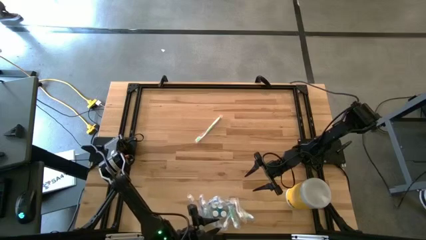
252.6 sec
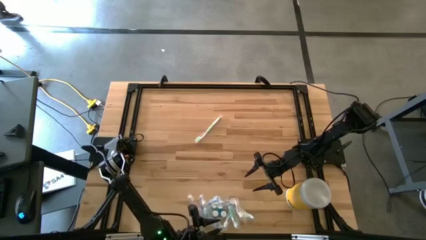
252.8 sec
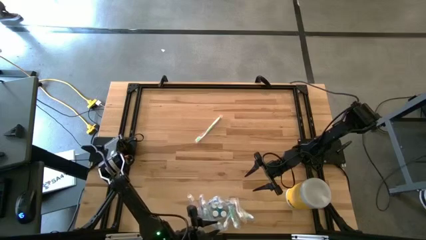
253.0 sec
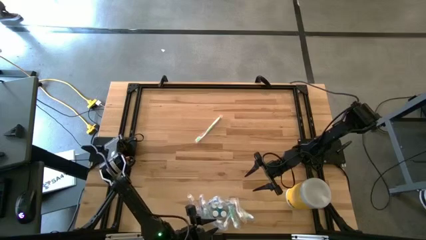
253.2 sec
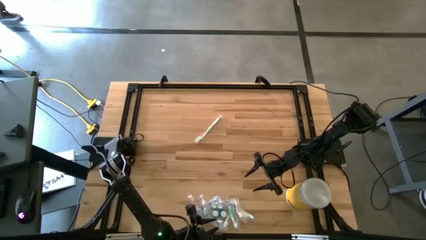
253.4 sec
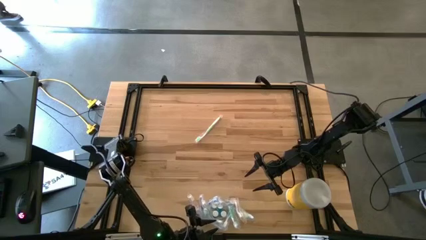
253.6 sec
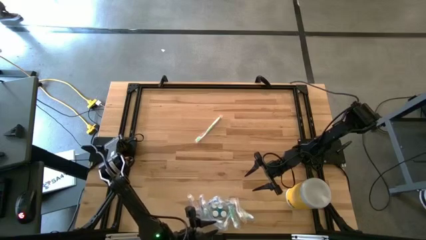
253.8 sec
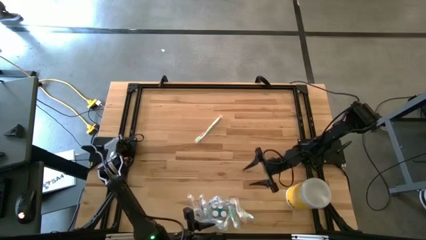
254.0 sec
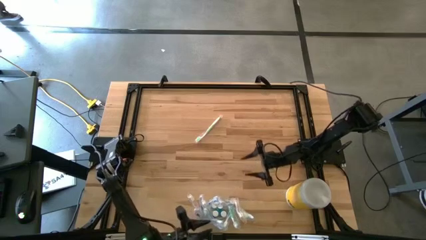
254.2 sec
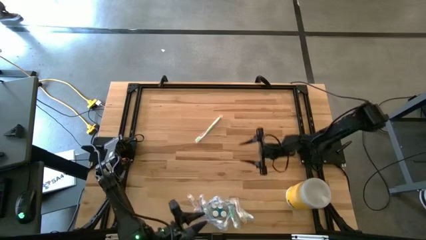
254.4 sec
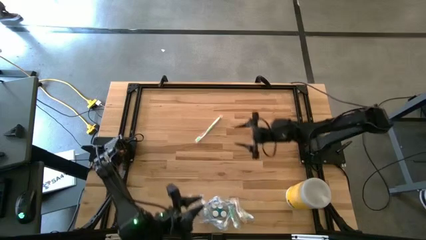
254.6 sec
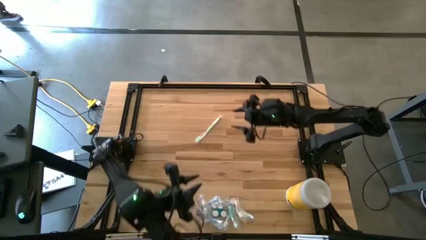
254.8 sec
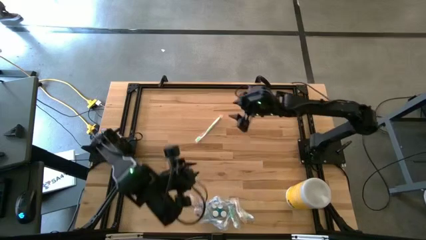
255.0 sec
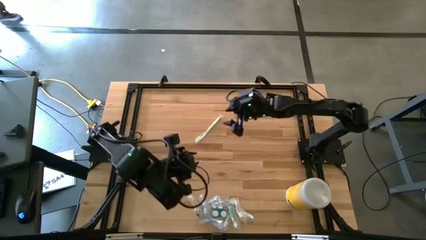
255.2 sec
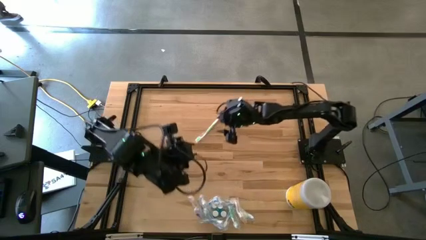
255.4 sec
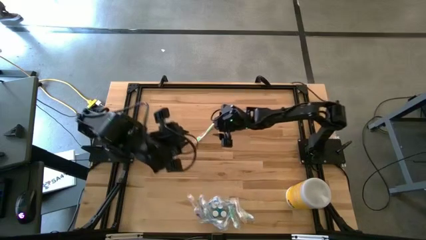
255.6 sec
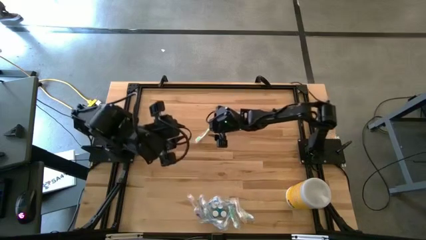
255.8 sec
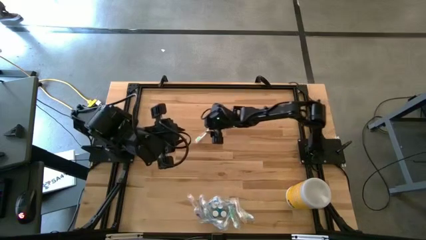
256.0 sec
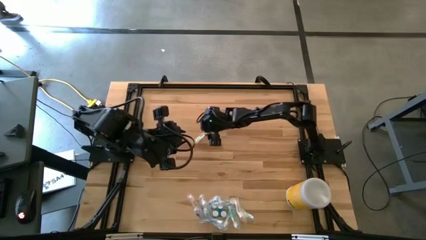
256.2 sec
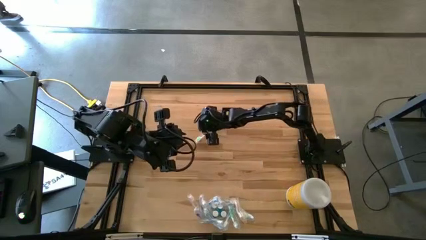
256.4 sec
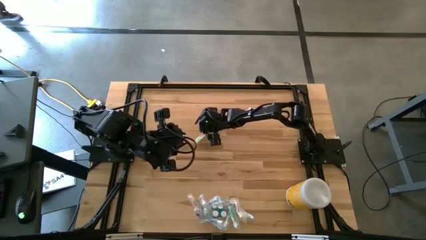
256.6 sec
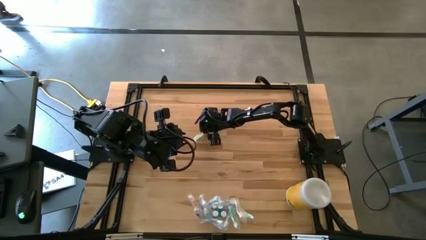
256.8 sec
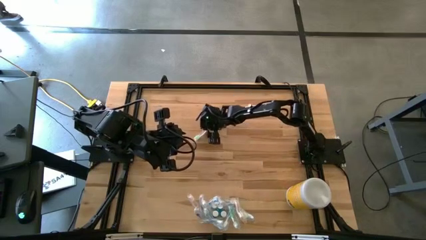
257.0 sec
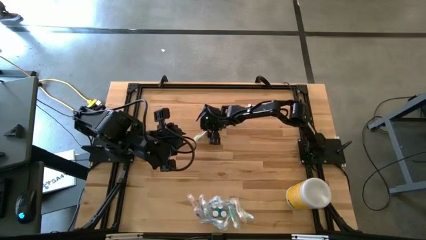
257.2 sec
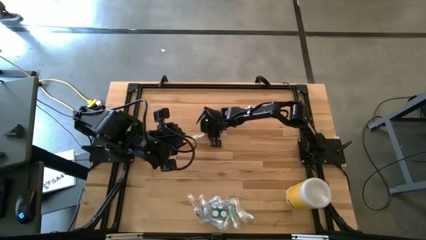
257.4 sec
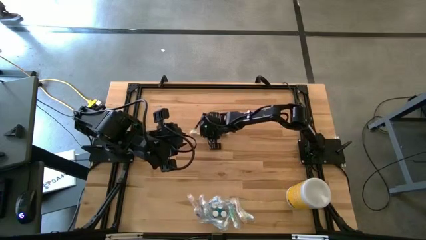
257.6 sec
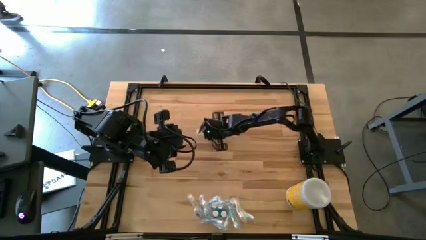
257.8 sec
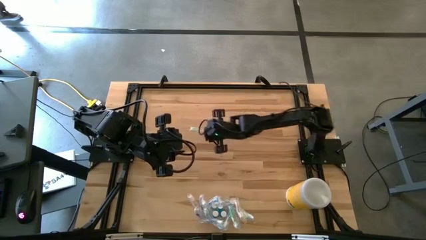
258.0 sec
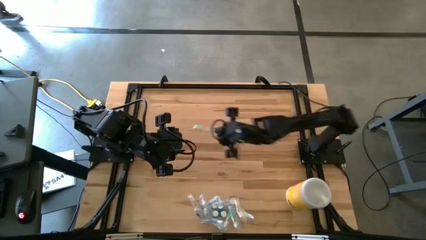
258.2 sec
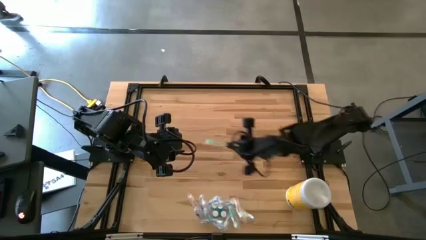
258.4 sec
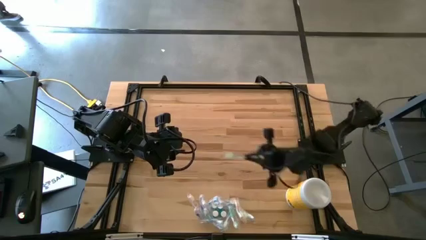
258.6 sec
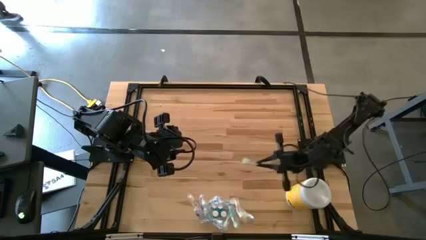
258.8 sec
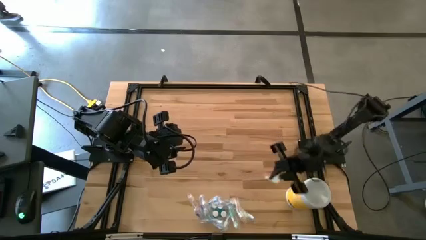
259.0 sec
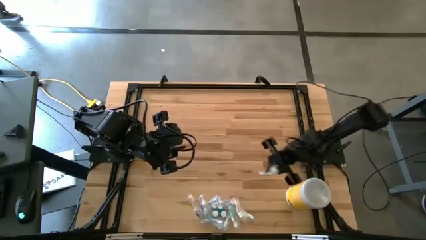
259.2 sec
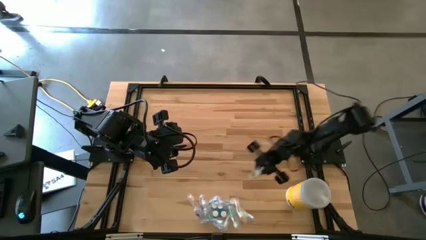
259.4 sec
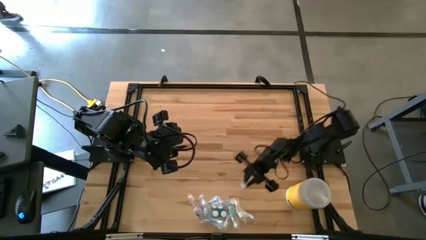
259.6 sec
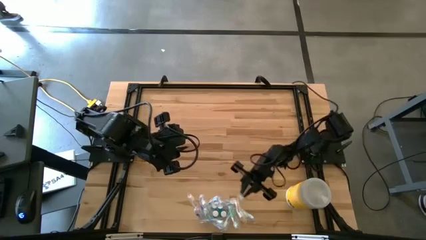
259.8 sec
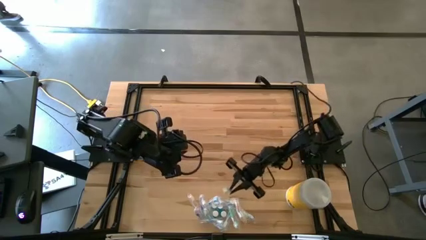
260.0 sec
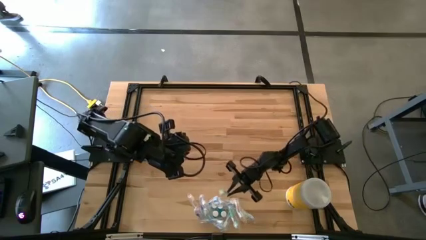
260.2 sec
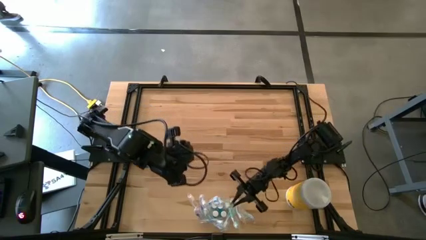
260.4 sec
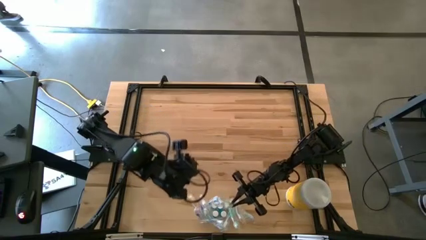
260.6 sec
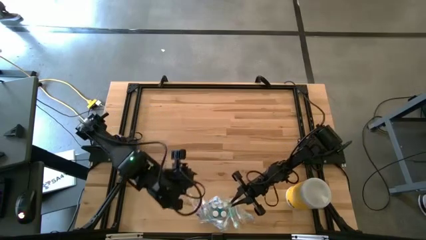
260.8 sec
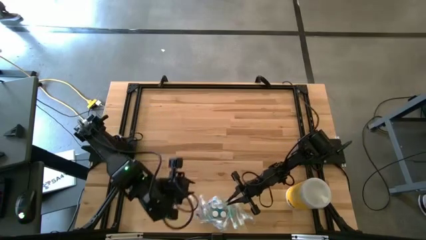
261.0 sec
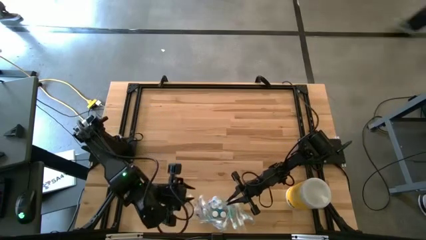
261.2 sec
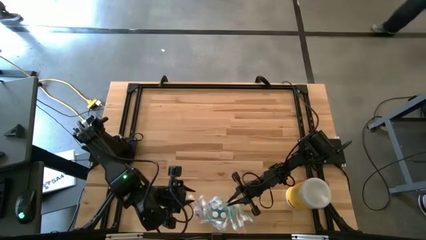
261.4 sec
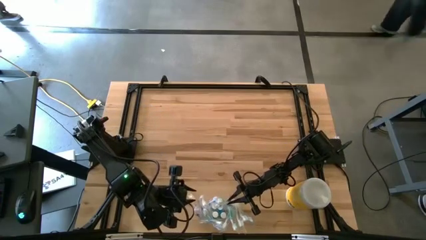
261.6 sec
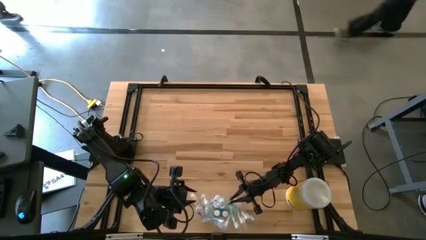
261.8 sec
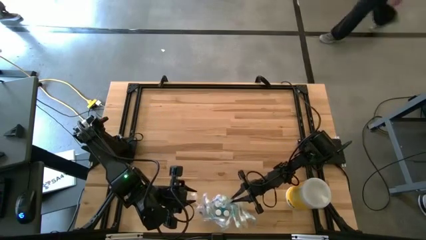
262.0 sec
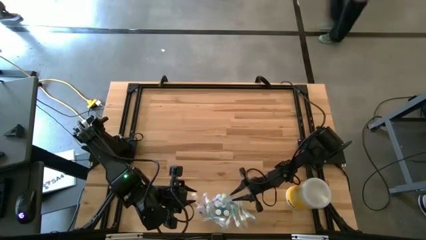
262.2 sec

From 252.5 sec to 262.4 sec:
Task: Pick & Place toothbrushing station
Put the green toothbrush into the transparent organizer

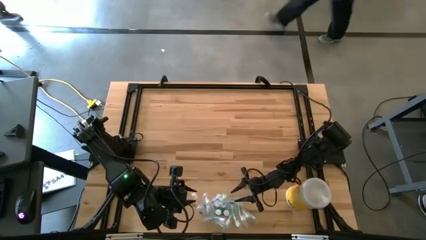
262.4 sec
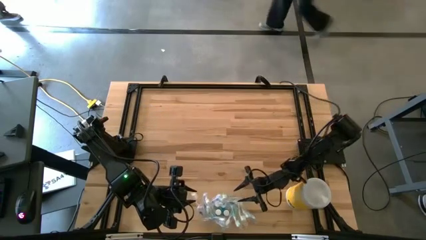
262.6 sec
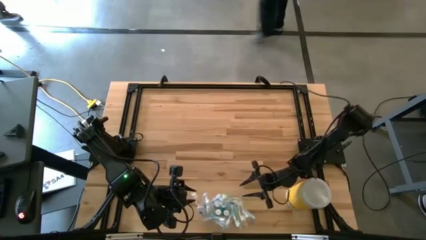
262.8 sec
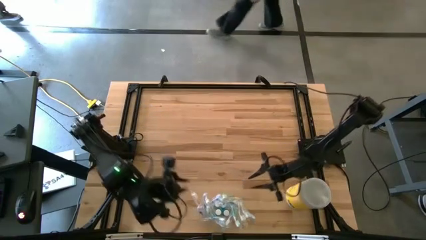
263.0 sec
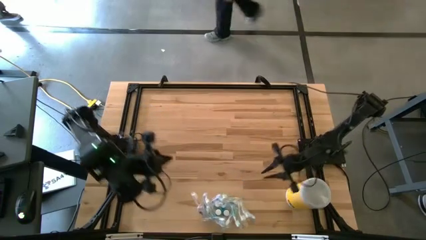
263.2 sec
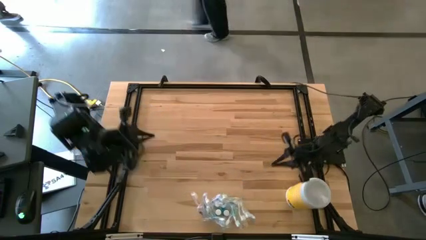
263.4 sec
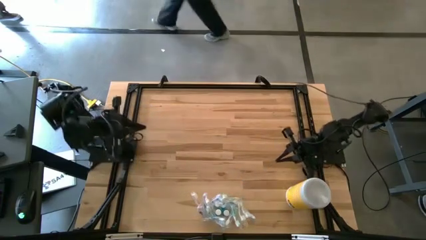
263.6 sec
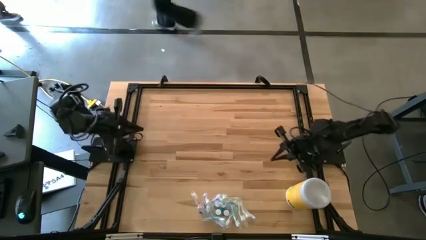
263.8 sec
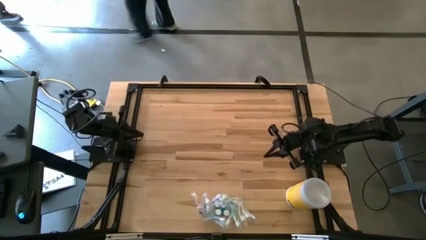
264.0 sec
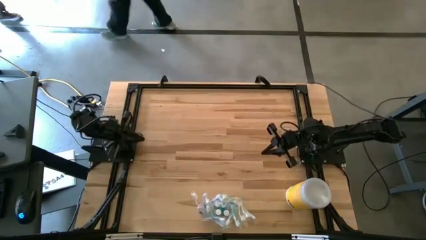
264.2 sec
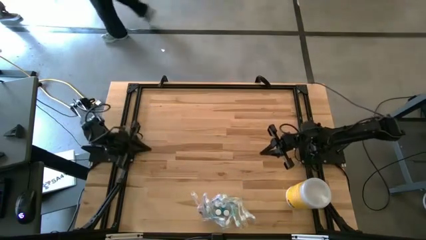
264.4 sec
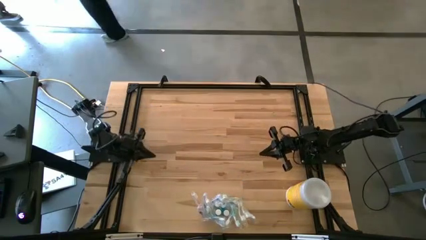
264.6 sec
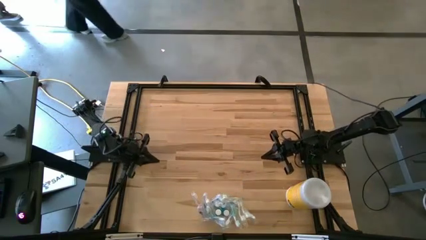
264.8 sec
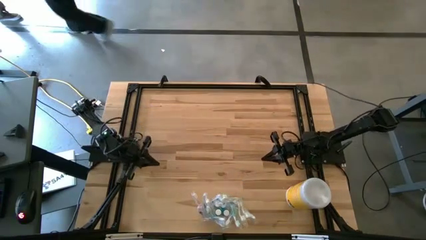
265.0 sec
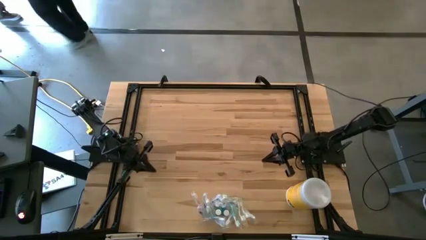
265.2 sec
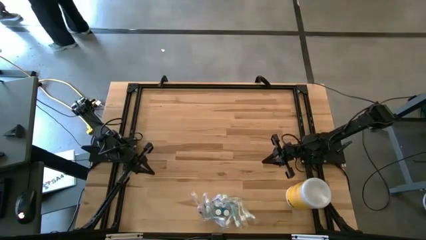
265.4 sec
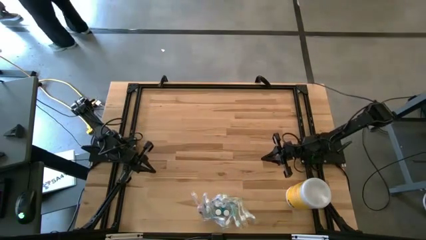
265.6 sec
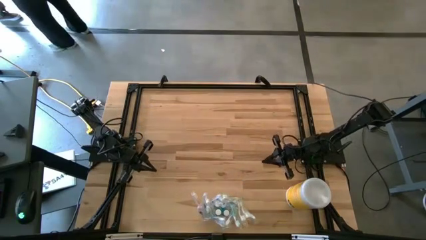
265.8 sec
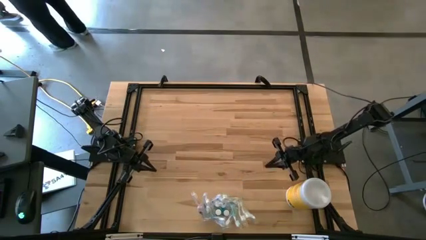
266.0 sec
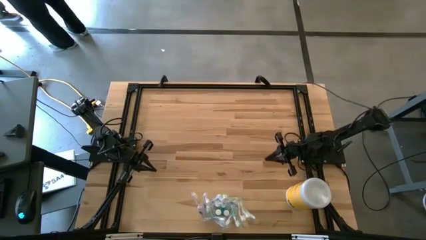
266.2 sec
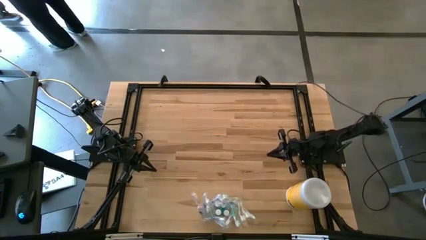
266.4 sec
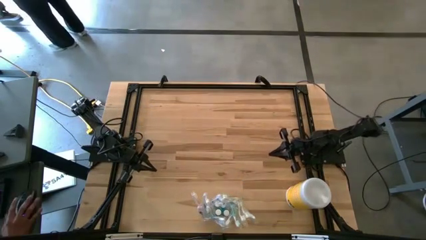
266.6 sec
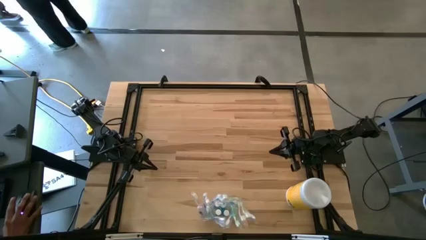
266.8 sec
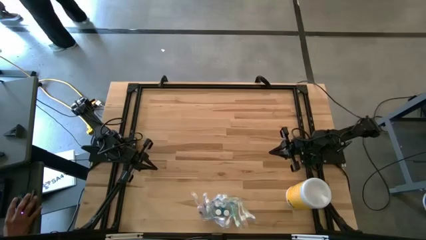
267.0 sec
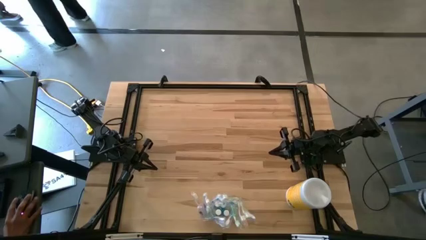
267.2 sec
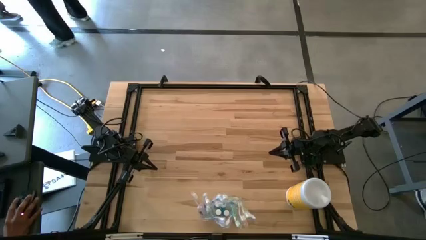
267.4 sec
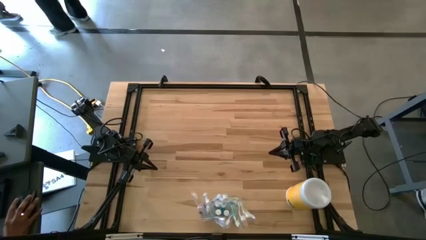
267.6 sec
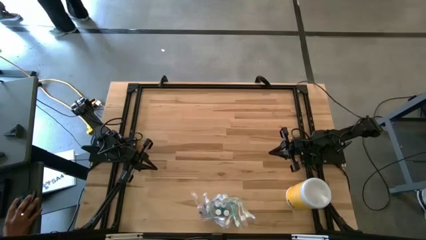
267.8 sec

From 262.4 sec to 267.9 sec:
Return to Home Position

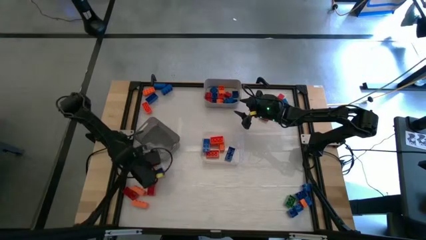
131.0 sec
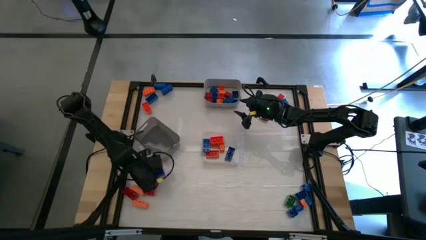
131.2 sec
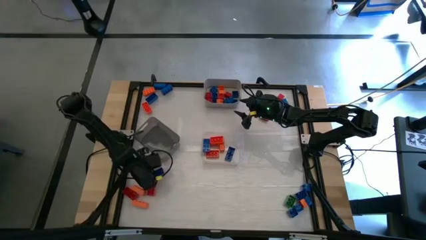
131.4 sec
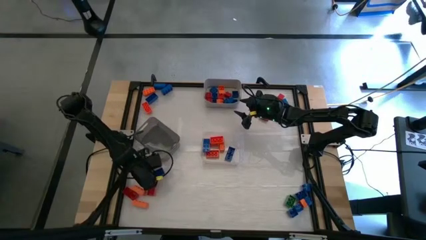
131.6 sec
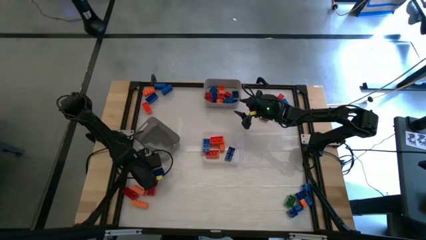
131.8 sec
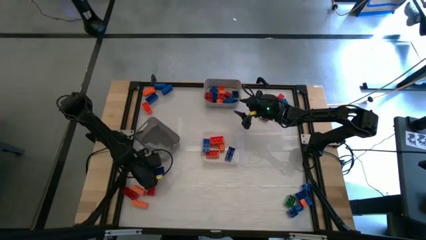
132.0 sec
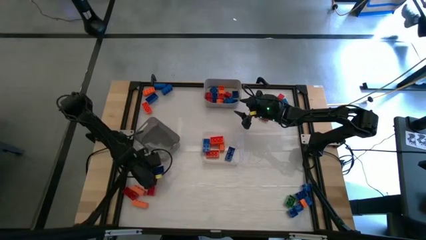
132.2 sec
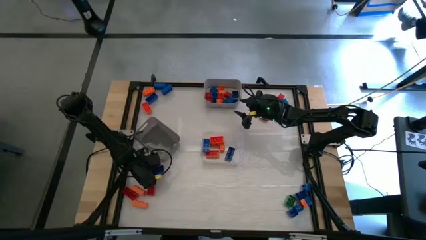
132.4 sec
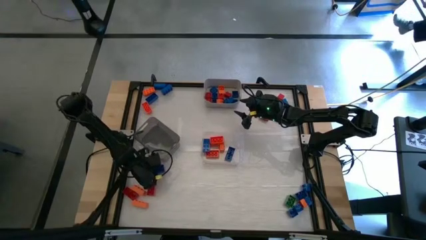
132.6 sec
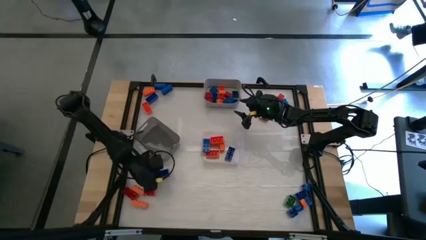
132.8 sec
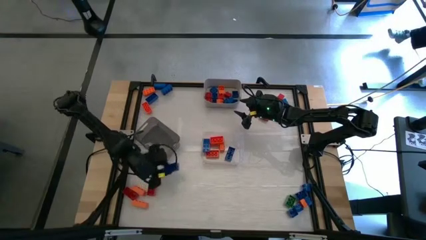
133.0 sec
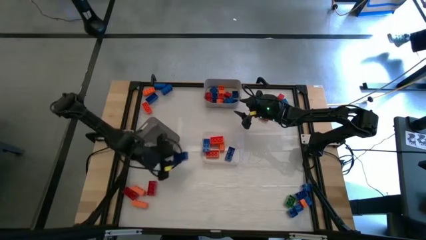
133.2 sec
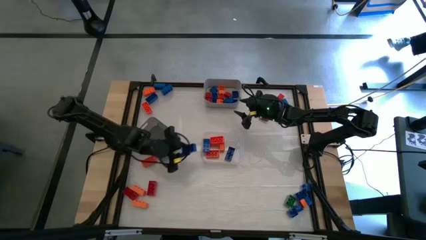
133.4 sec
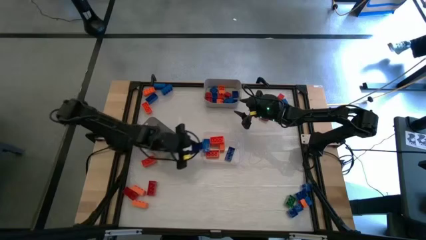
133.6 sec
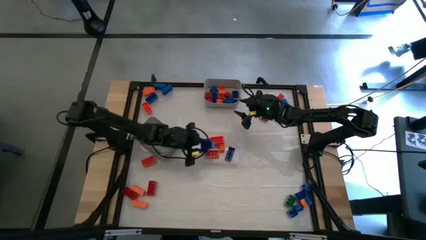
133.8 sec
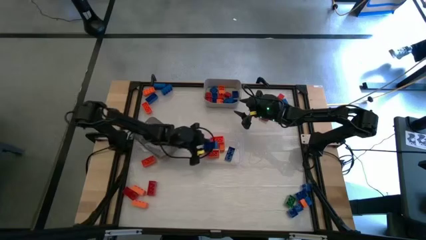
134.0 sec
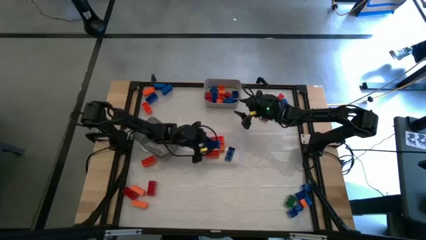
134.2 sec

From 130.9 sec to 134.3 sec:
Task: Sort blocks by size
Put the big blue game piece into the transparent bin
